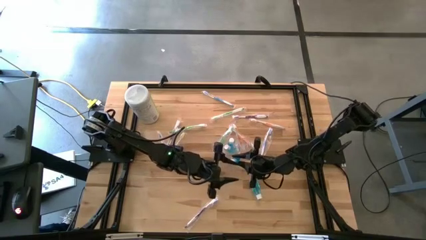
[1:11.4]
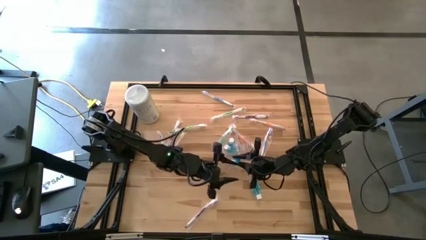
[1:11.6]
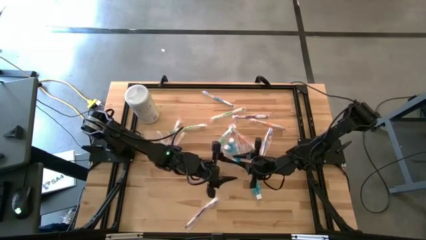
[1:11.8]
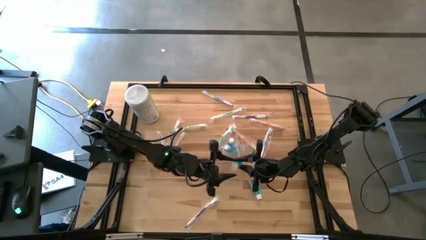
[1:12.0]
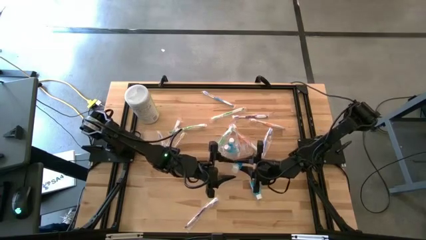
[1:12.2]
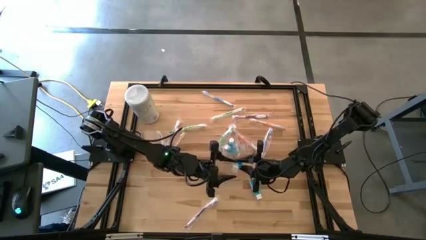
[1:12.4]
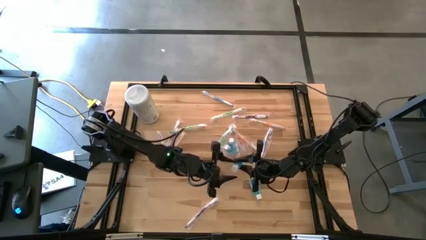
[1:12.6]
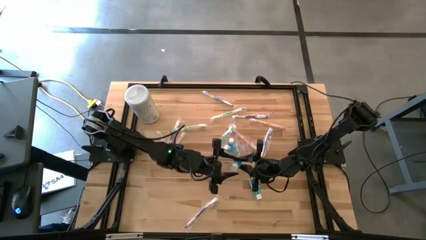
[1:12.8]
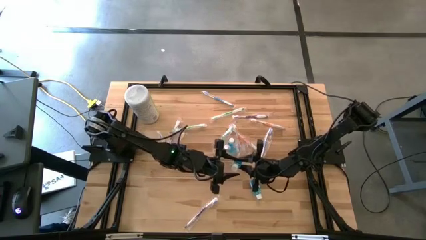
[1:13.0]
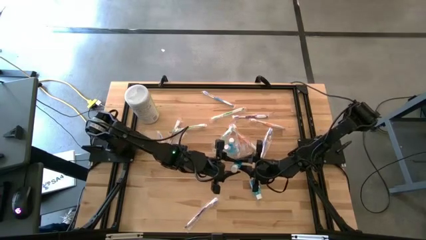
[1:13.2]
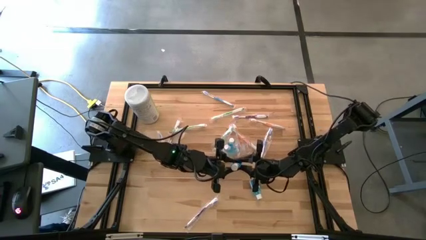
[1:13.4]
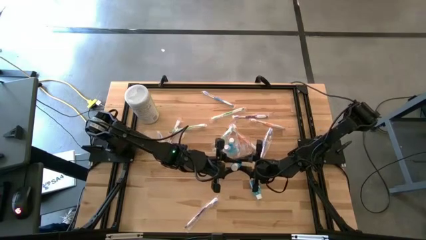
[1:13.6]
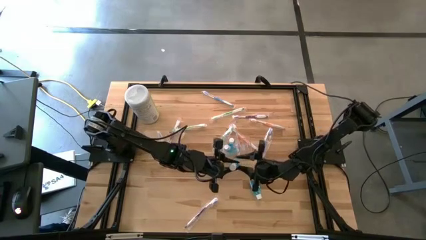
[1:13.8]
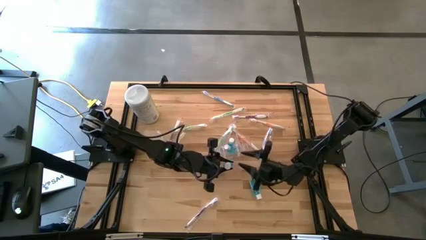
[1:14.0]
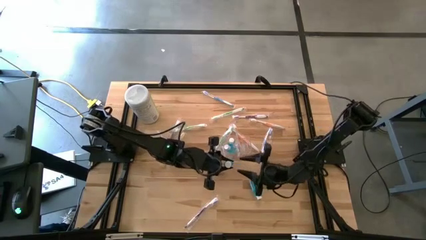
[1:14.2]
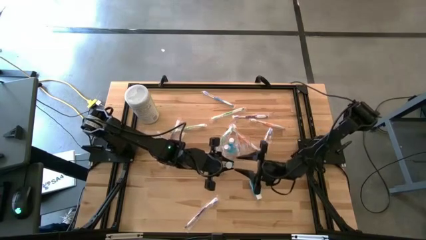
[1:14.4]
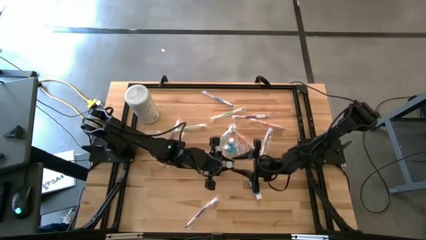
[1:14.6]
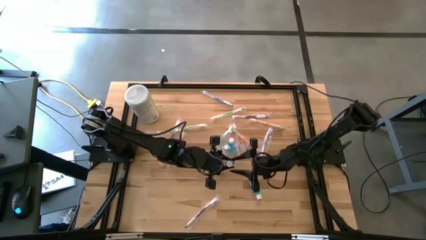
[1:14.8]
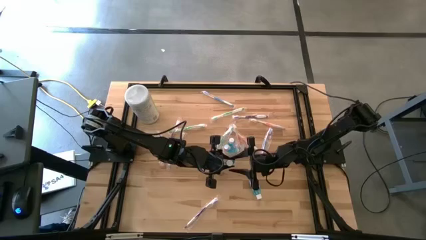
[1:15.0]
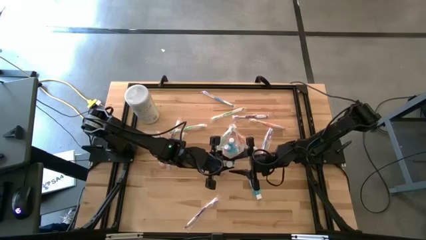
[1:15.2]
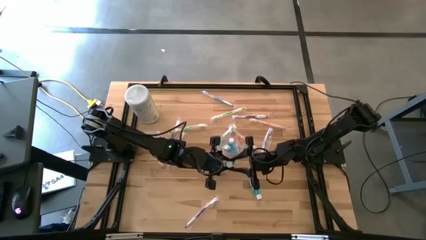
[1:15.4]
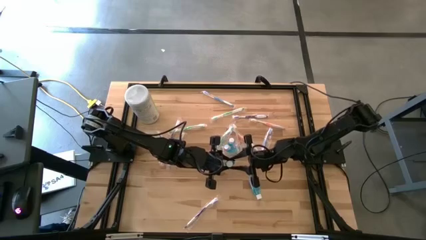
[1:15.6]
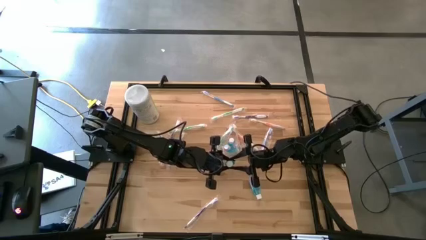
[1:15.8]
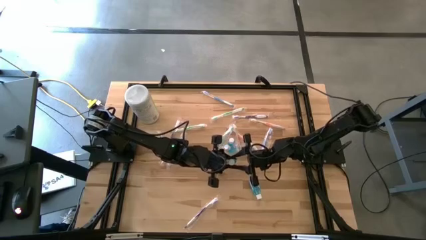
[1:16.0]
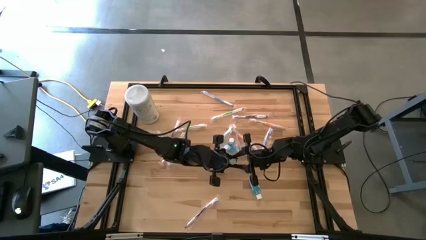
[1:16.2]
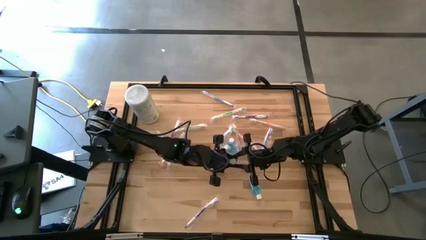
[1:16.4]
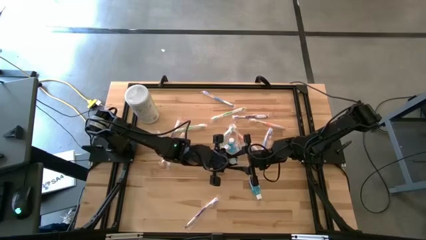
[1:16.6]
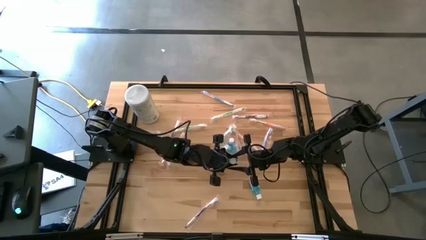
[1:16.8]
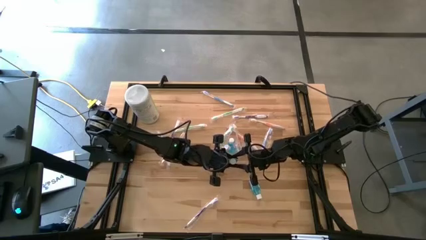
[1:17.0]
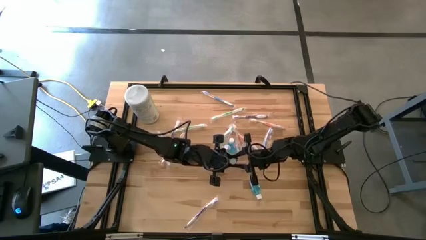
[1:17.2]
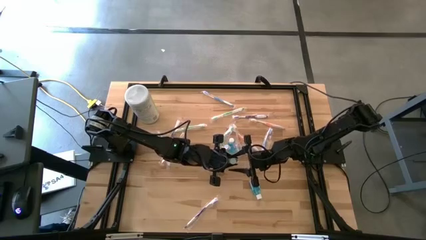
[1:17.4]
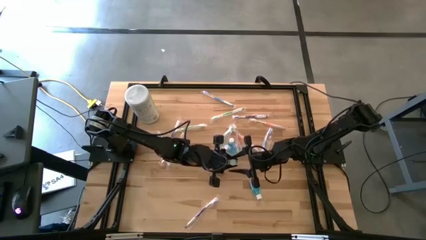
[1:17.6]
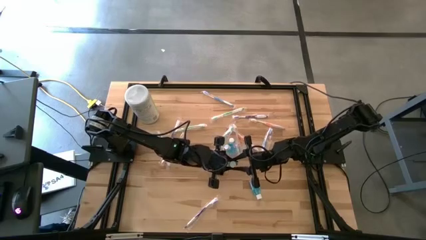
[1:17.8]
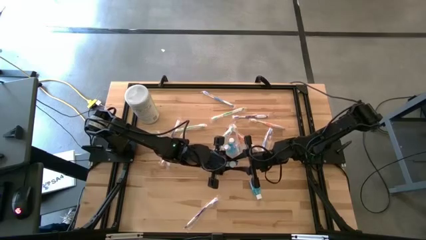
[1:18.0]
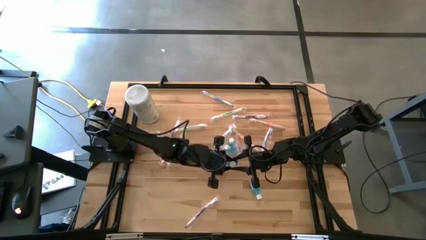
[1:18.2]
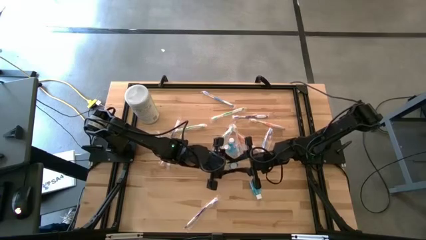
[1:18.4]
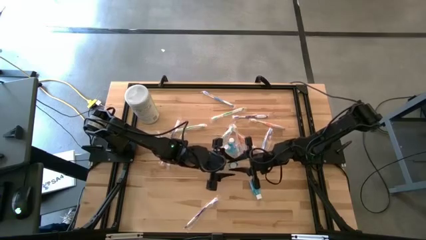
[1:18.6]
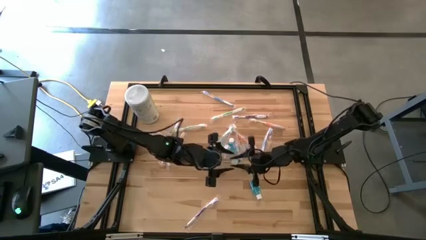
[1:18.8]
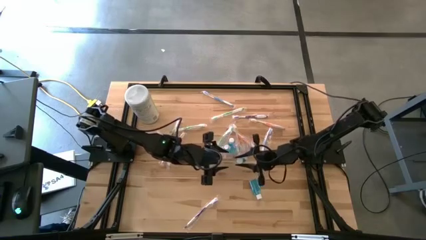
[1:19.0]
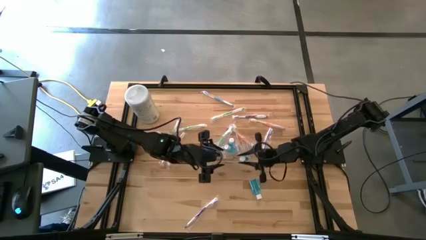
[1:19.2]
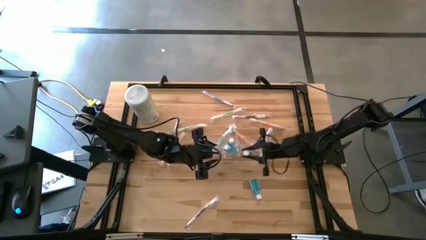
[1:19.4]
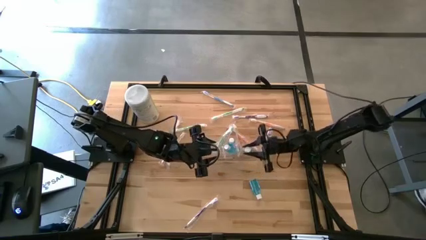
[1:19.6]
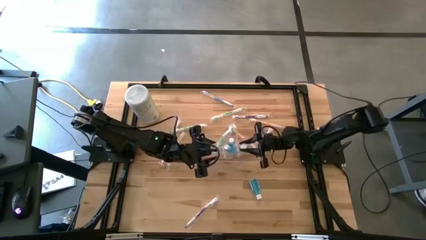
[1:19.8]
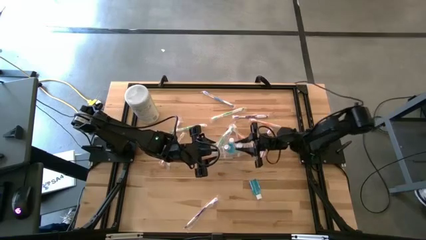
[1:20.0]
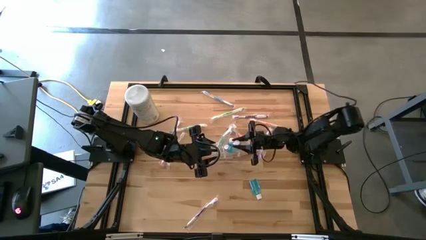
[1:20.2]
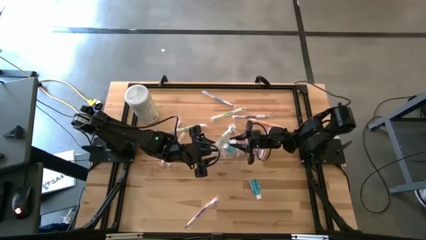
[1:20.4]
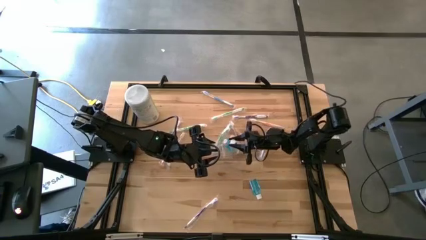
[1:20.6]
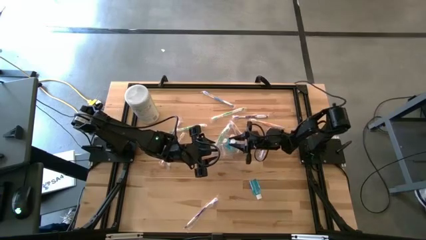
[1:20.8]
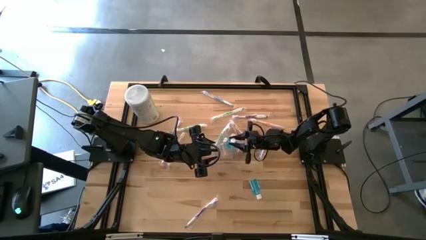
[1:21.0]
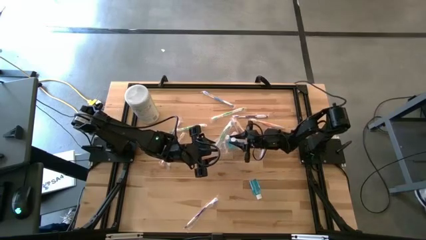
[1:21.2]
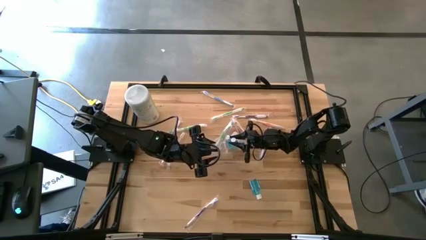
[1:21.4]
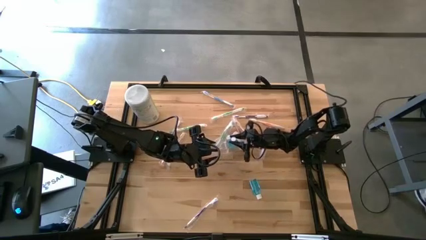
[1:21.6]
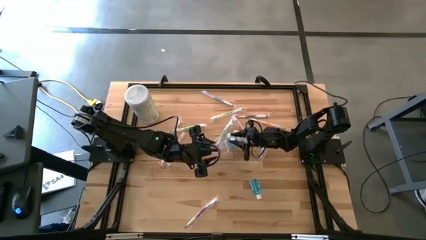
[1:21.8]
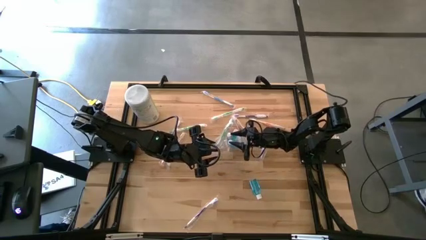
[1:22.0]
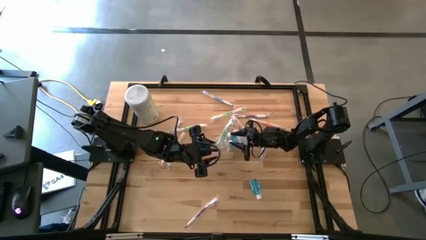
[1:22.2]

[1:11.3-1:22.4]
Task: Pick & Place toothbrushing station
Put the blue mouthwash into the transparent organizer

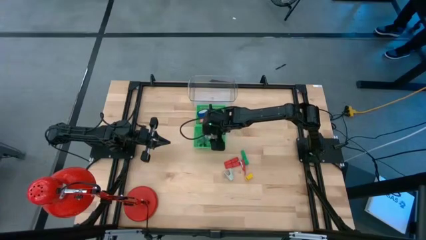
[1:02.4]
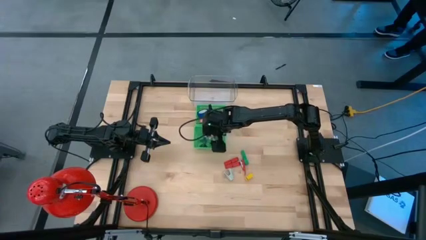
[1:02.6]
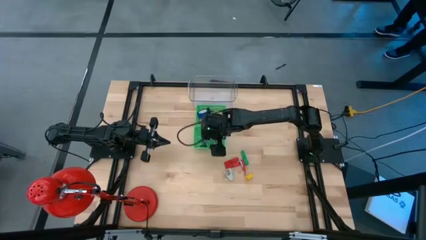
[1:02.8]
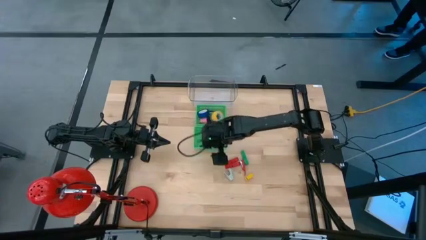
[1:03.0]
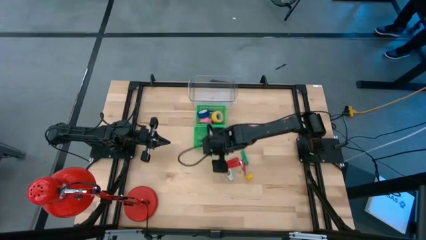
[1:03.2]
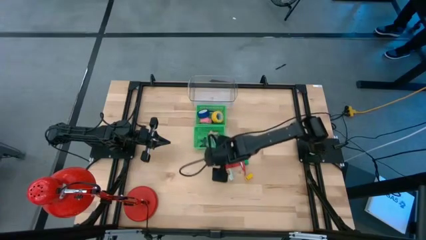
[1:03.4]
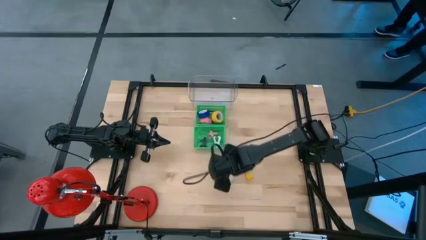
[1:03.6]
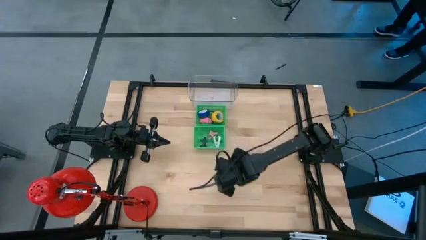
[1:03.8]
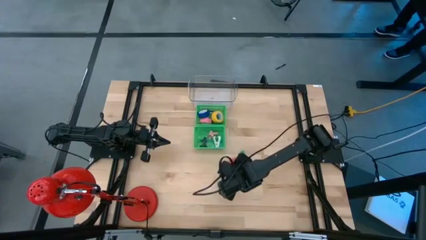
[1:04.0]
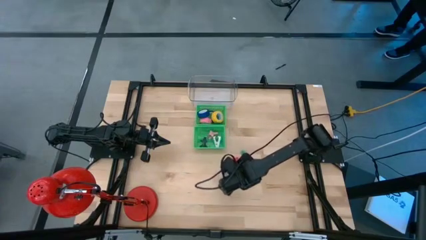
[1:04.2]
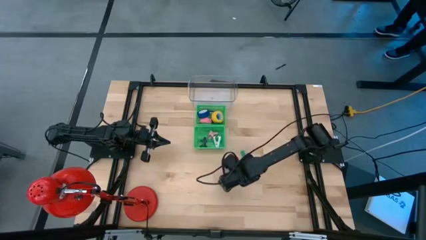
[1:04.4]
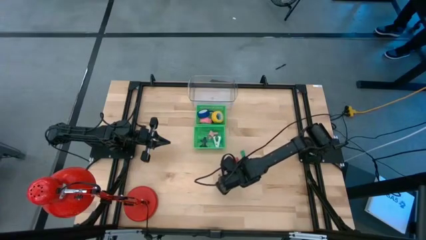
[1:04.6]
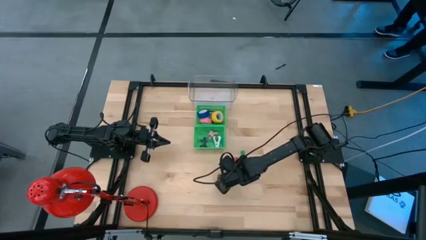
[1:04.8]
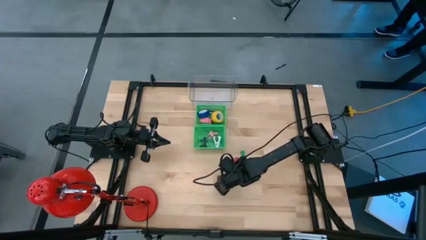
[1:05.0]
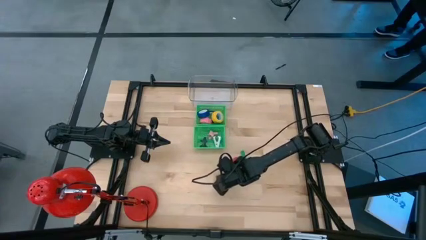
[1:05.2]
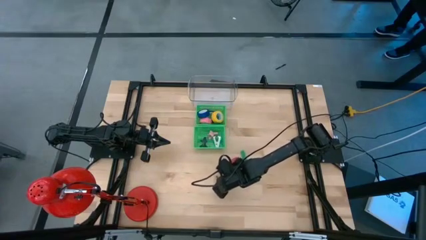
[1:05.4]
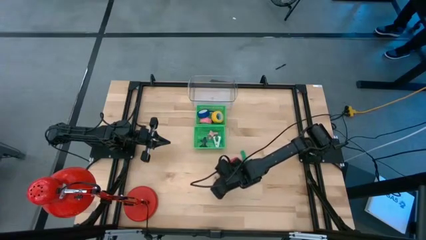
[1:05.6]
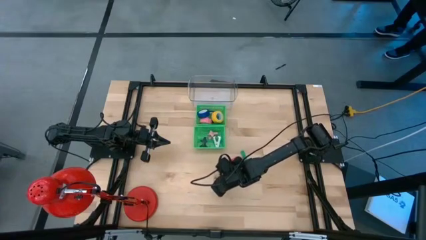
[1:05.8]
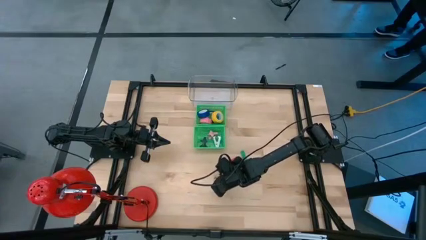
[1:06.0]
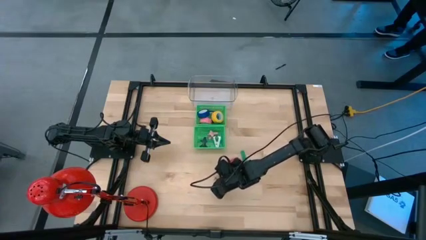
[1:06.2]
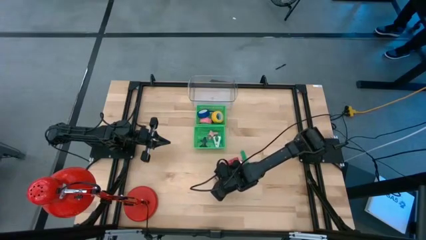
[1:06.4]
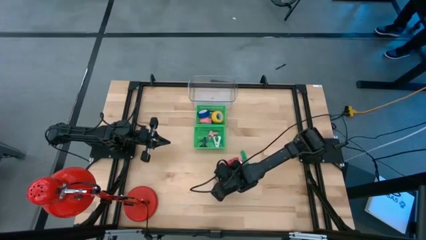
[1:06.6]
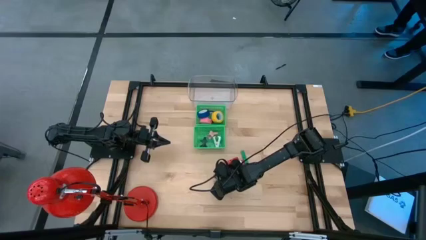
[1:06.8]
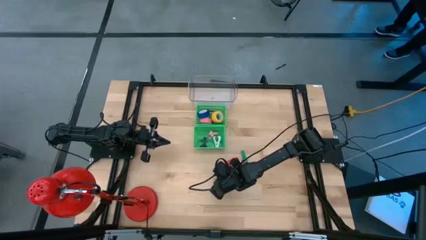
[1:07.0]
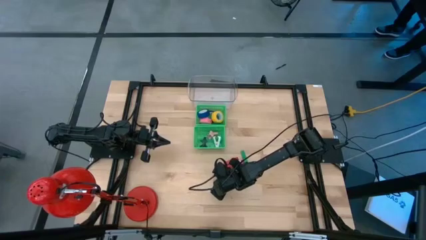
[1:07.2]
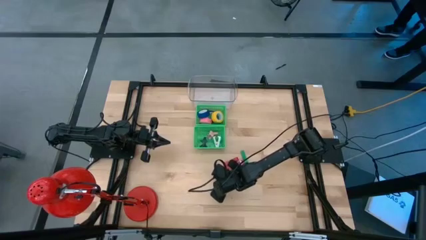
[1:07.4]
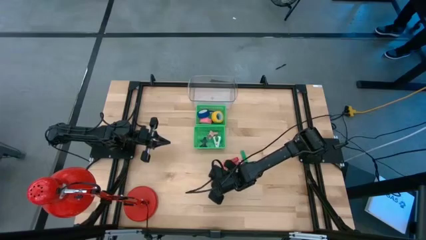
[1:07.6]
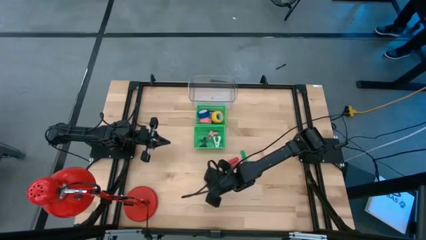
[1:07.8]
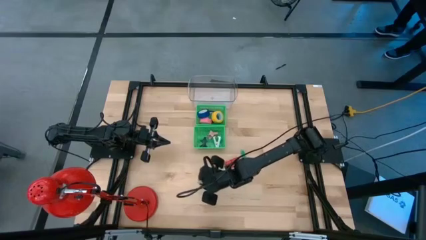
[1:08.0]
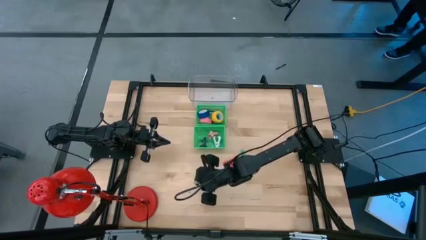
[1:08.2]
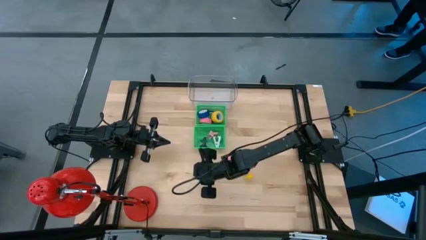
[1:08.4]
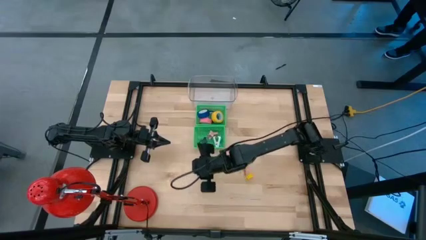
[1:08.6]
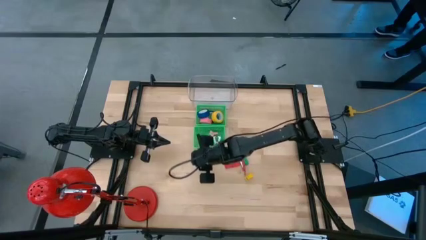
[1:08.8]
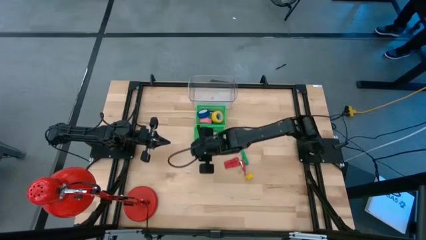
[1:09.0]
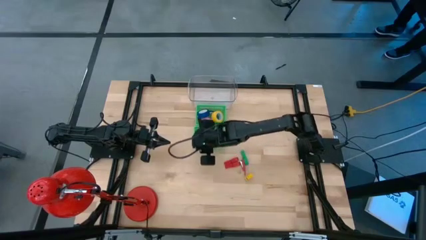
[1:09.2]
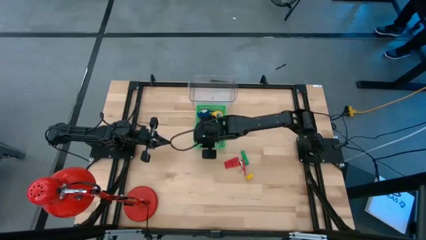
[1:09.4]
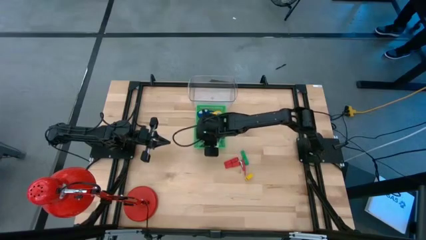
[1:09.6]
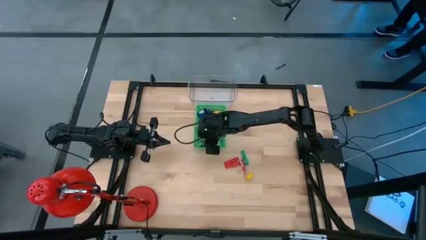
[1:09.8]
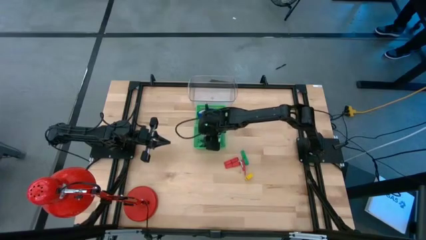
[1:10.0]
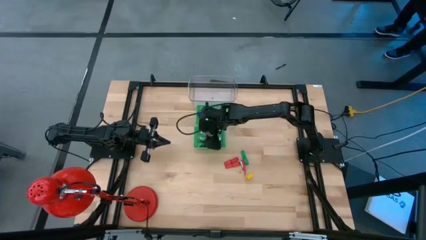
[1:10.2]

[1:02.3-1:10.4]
Task: Pick and place Stapler, Stapler remover, tape
Put the gray staple remover into the bottom green bin
